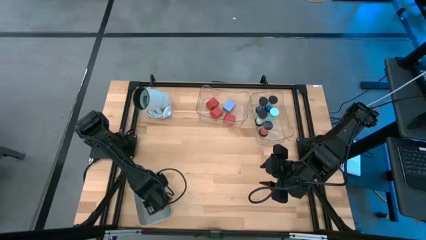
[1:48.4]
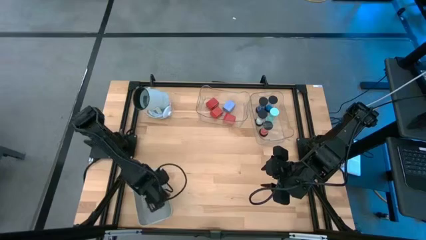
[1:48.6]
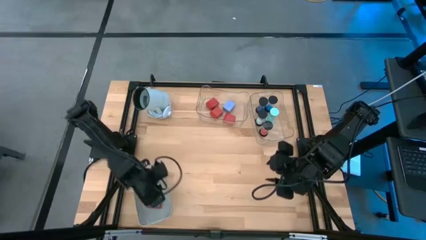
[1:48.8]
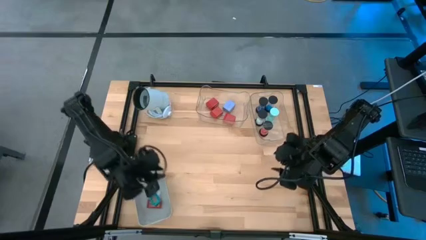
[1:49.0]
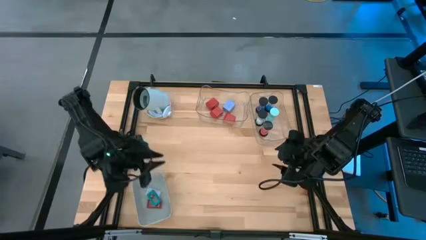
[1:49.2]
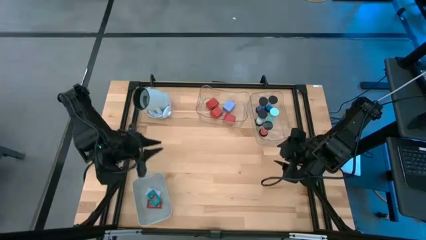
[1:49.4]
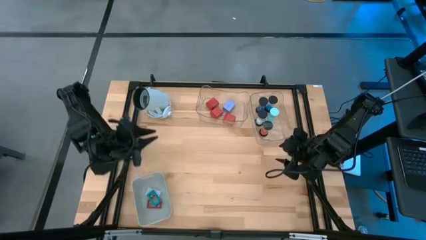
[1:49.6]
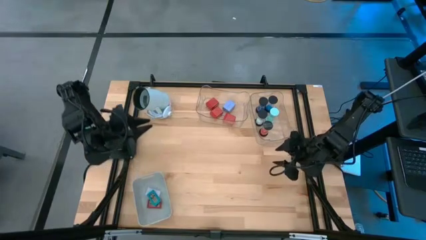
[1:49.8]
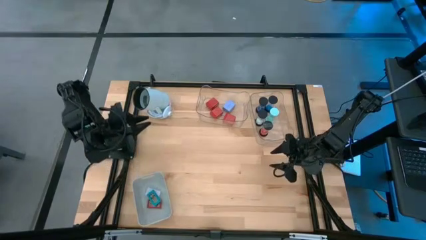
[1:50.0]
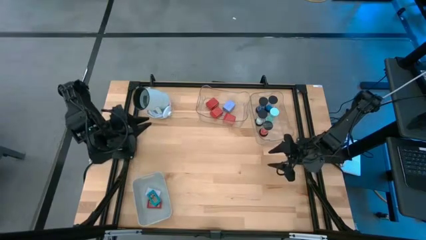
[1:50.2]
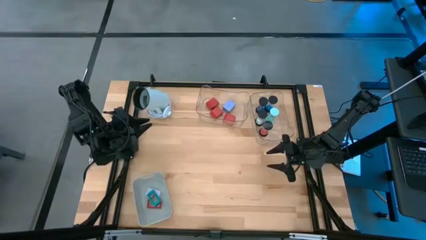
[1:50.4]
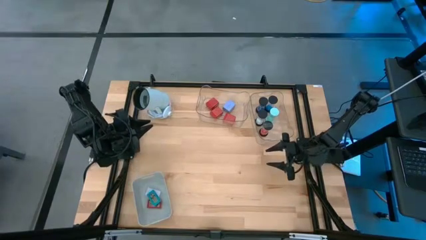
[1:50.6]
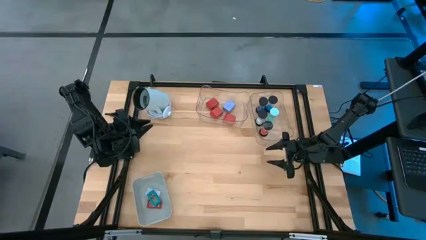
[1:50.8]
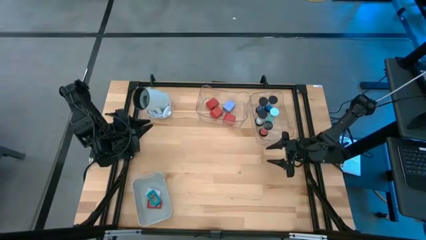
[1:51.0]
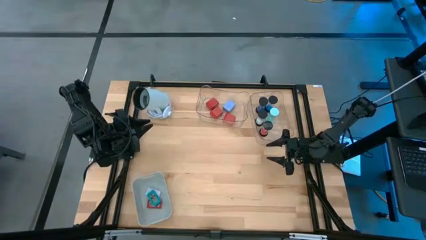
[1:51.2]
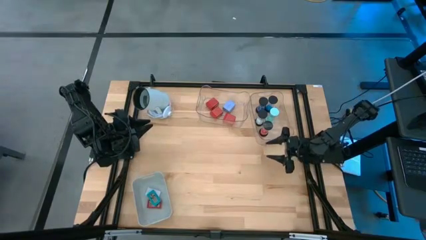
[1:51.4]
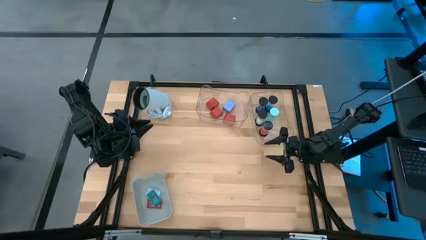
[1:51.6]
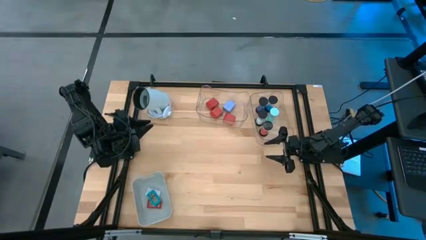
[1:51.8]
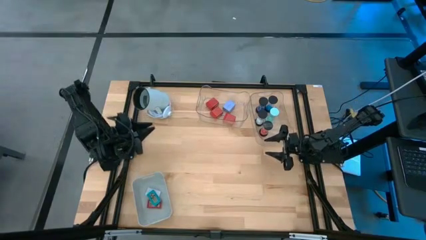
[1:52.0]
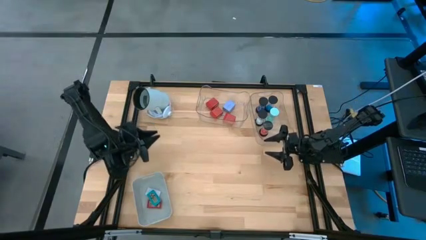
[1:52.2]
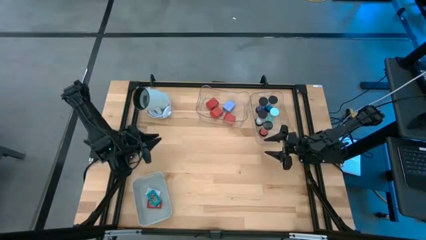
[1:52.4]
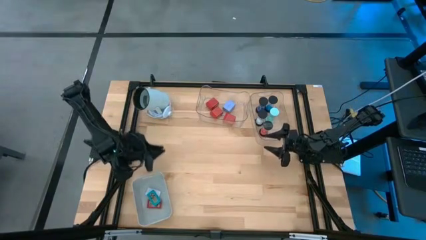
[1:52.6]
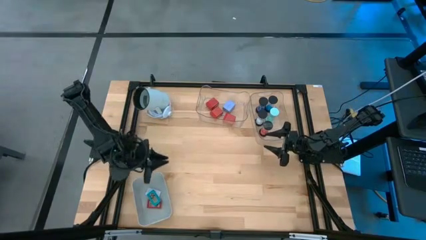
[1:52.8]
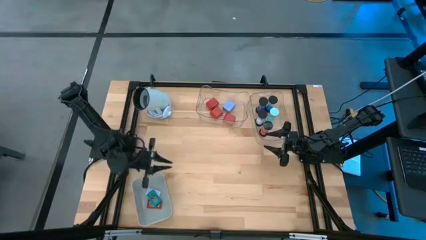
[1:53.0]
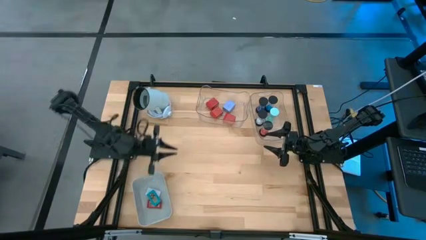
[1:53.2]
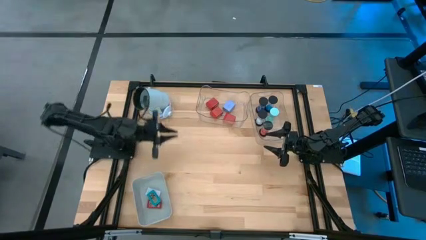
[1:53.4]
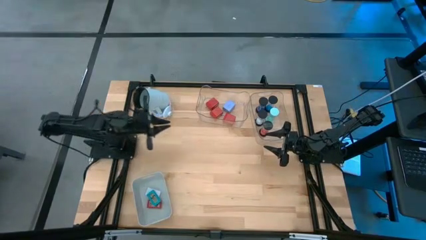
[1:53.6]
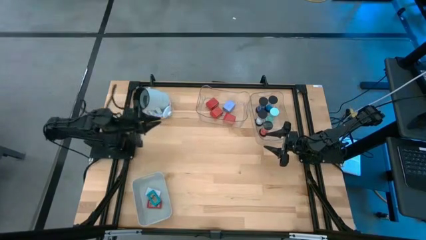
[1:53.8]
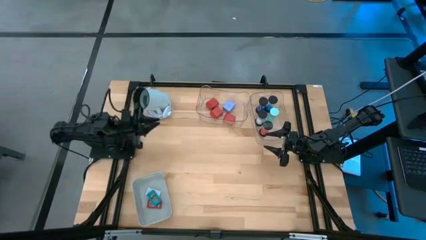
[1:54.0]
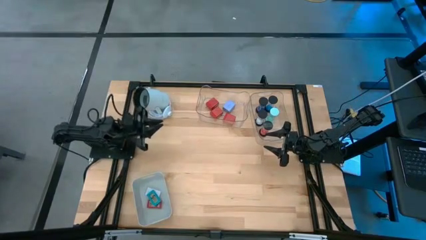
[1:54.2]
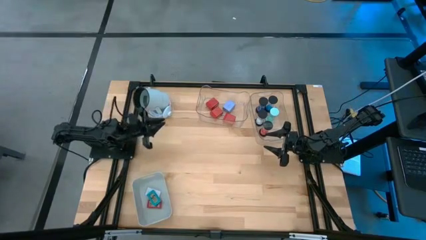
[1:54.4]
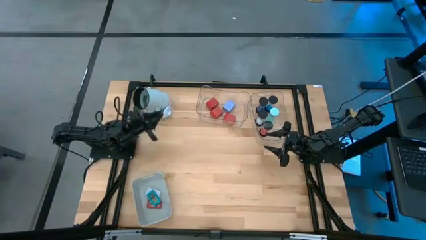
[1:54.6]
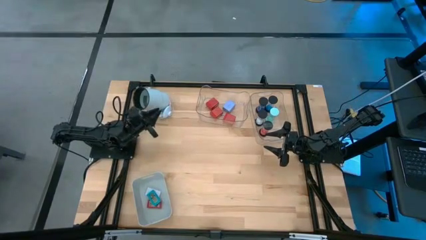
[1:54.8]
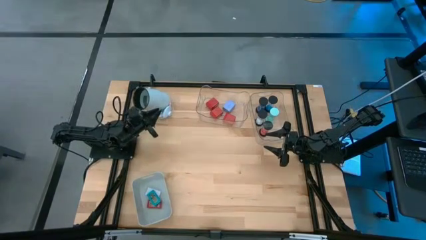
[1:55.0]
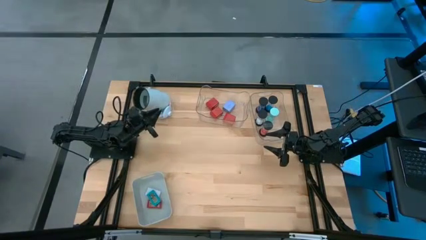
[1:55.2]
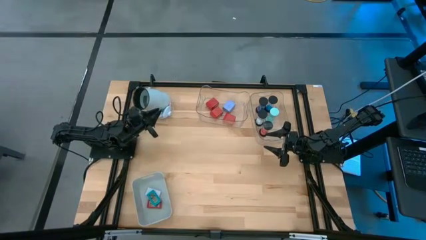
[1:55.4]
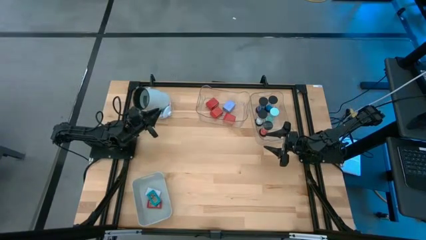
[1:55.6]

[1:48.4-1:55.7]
Task: Pick & Place Office items
Return to Home Position

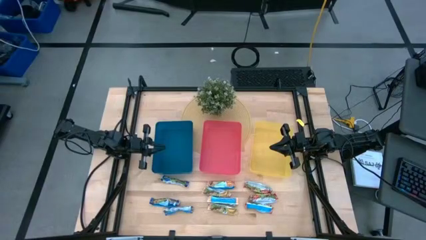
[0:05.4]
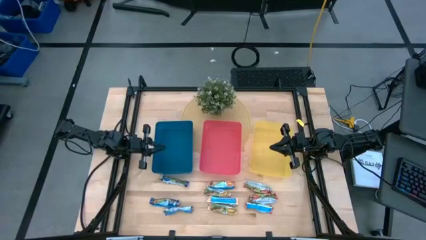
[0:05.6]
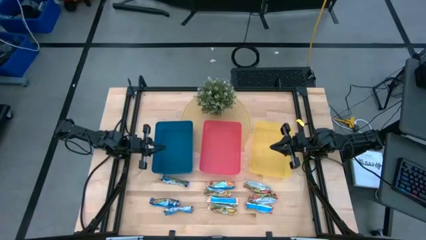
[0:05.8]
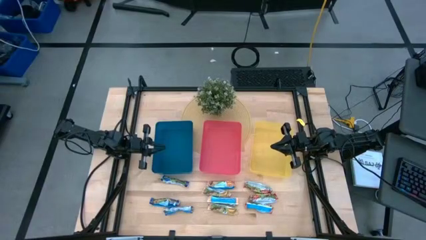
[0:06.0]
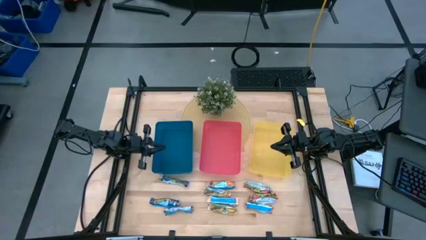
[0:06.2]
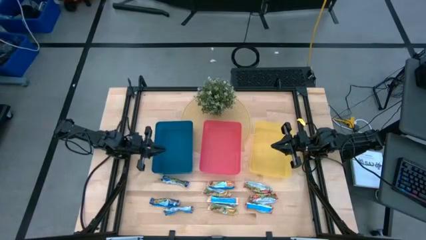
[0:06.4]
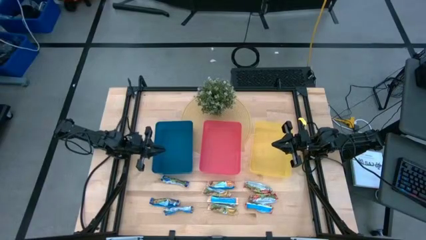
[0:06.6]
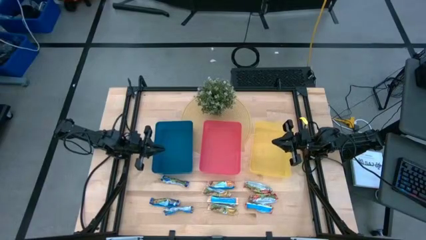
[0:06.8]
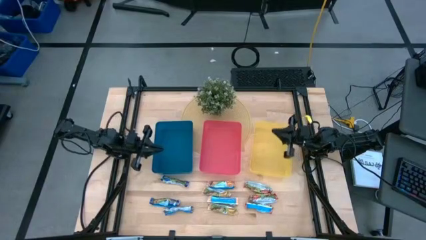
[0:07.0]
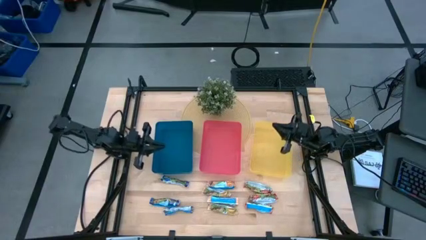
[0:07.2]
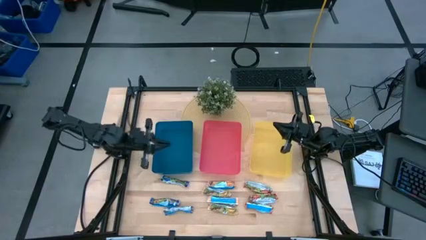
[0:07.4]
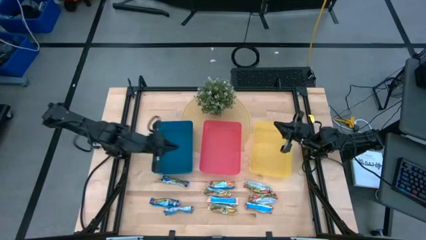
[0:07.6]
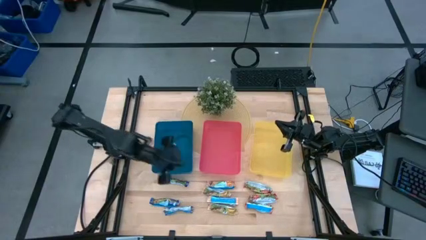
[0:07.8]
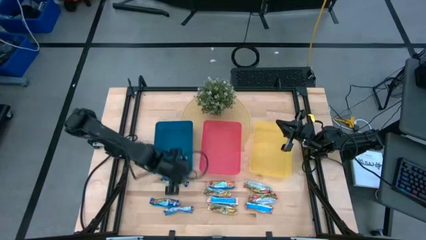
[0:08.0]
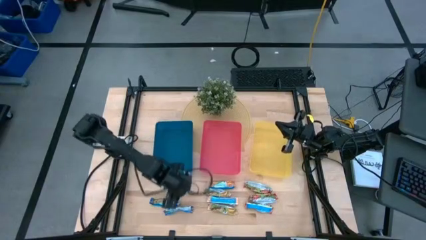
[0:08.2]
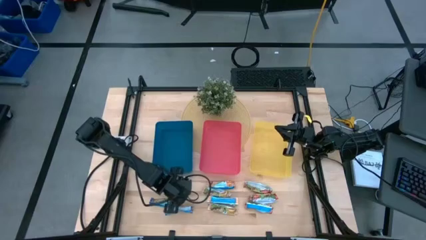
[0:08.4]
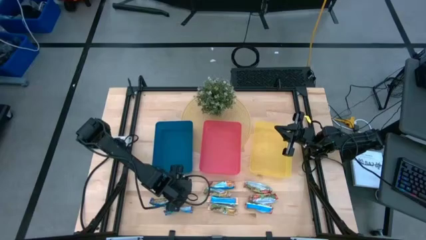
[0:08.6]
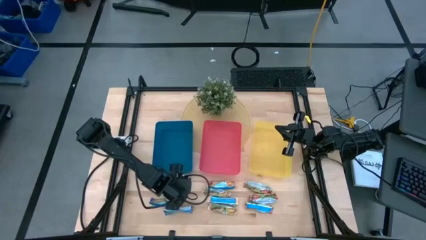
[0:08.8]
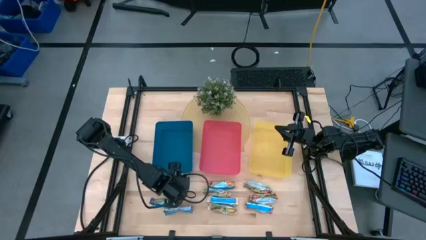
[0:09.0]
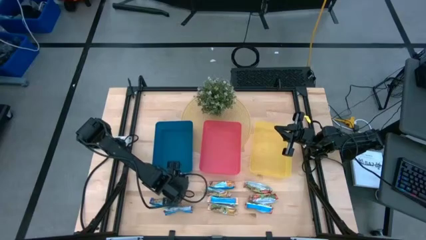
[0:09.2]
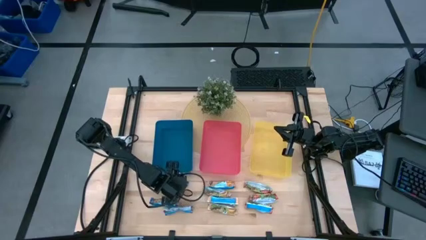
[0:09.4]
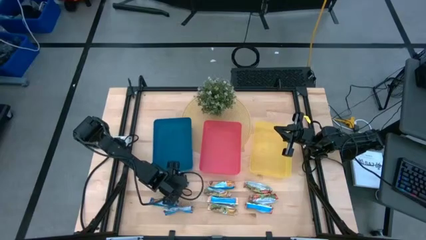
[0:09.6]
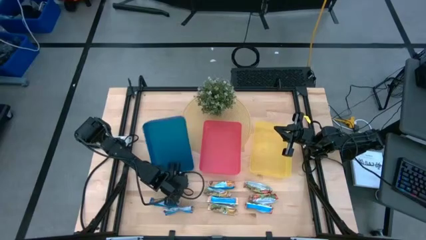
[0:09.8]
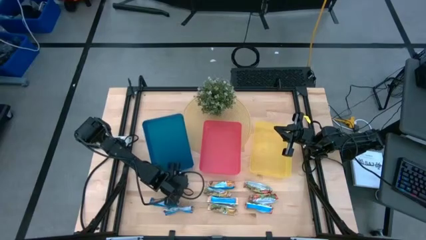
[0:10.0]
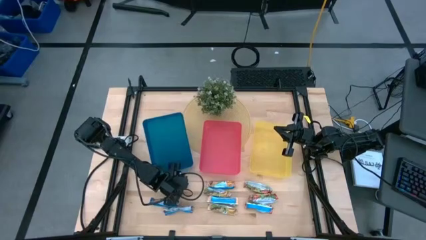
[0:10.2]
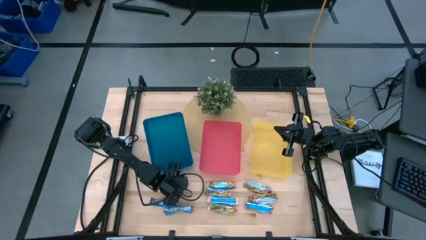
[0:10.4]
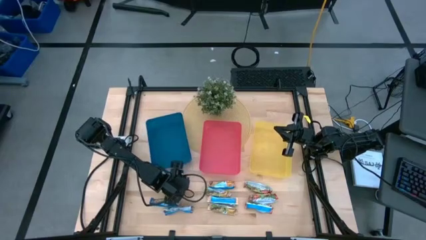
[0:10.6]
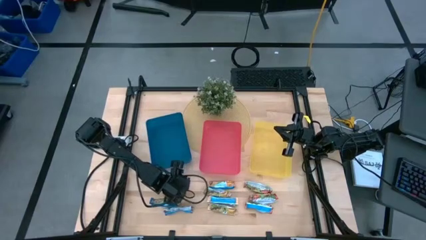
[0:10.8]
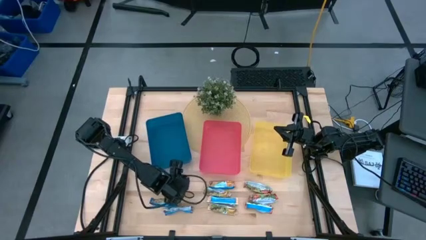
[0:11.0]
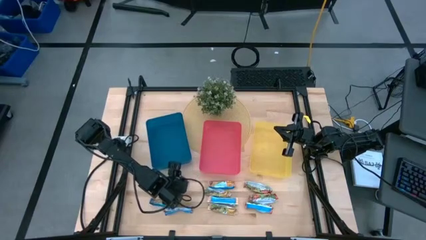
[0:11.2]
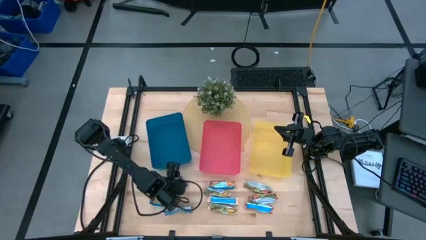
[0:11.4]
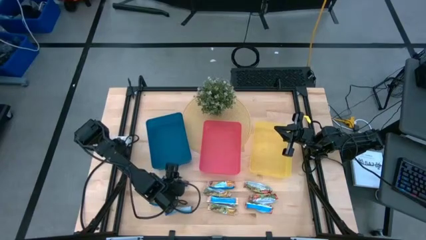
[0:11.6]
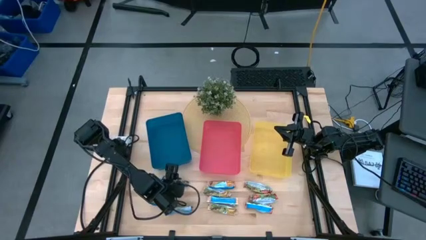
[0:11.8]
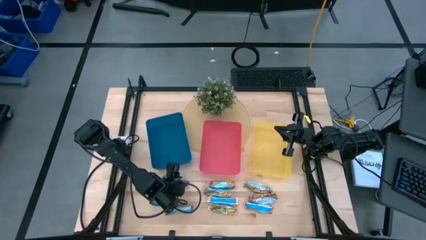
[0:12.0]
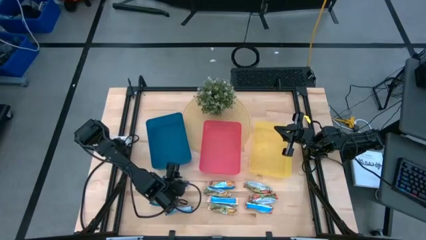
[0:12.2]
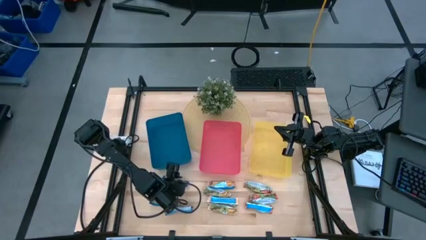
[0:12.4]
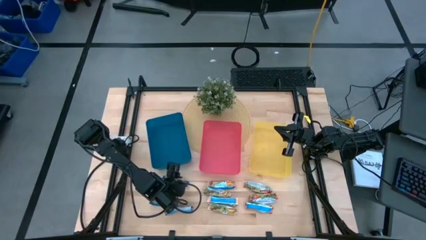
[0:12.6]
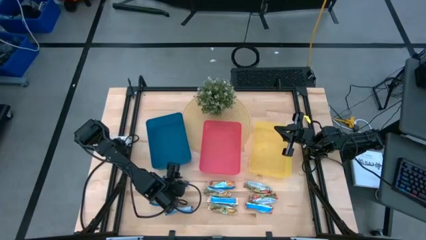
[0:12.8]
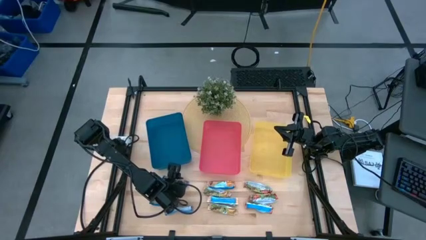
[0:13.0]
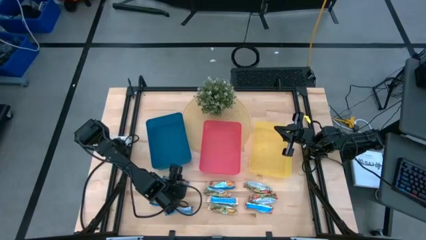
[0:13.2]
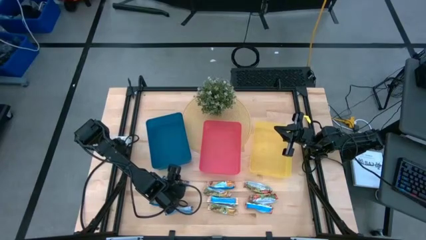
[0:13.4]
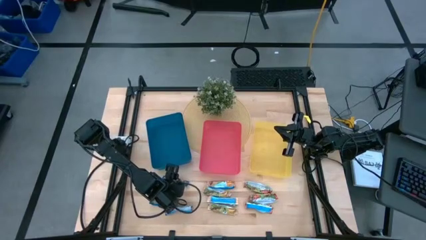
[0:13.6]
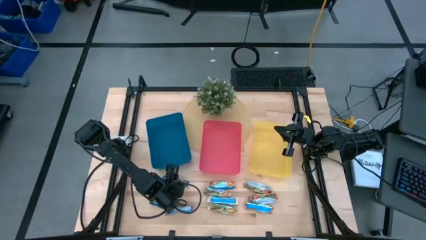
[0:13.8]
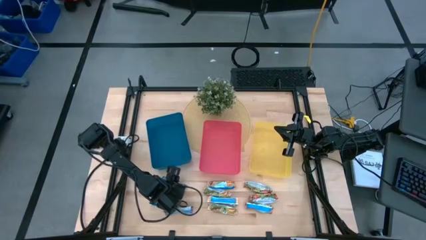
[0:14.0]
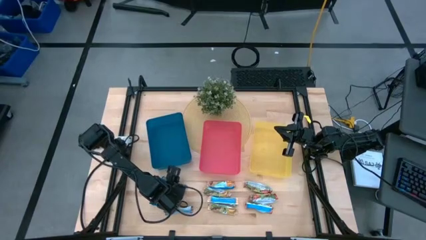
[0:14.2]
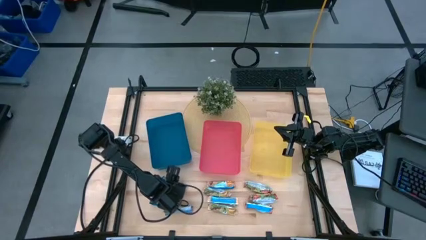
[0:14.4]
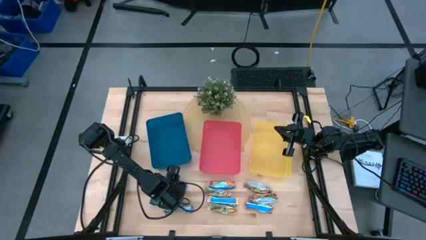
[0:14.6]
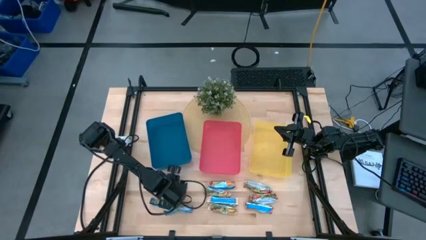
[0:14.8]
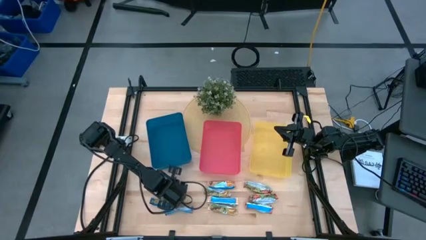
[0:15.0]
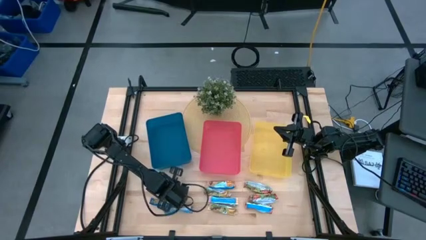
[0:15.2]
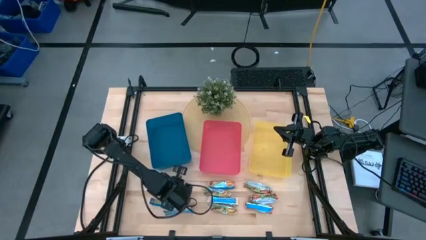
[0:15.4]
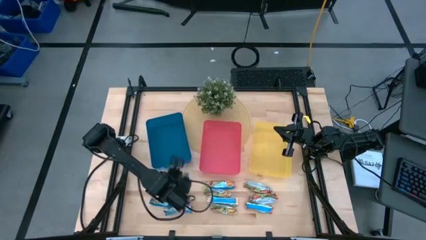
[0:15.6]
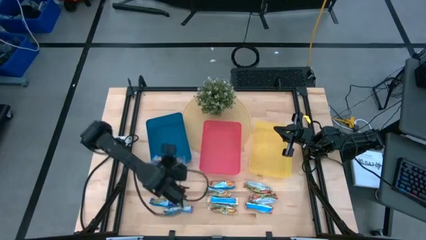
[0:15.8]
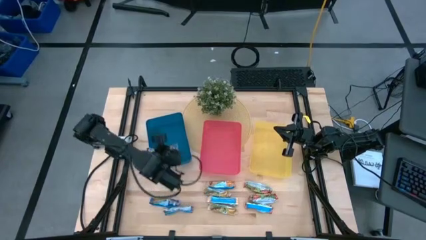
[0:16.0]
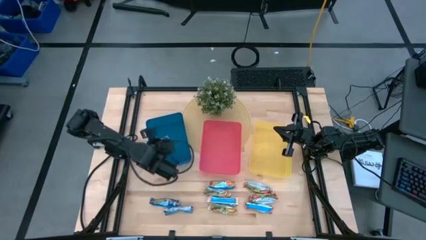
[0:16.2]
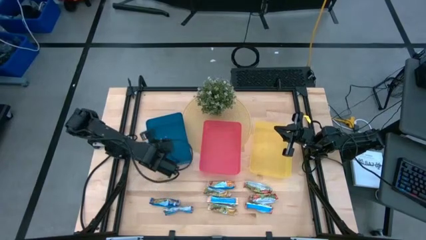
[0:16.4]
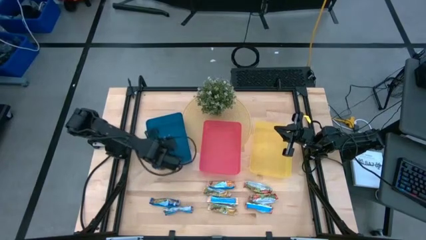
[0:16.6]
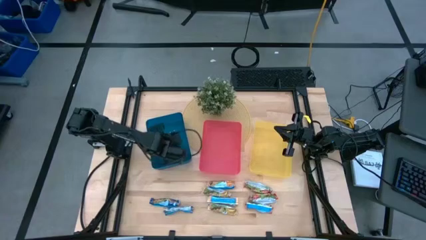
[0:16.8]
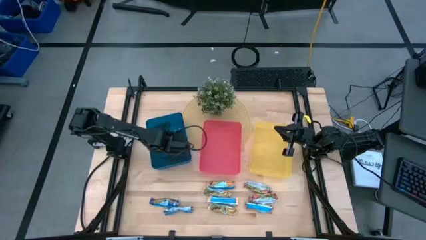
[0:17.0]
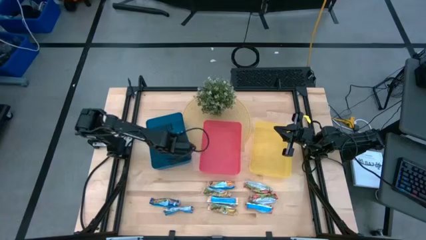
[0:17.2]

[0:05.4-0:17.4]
Task: Pick and place Granola Bars by type
Put the top blue granola bar into the blue bin
